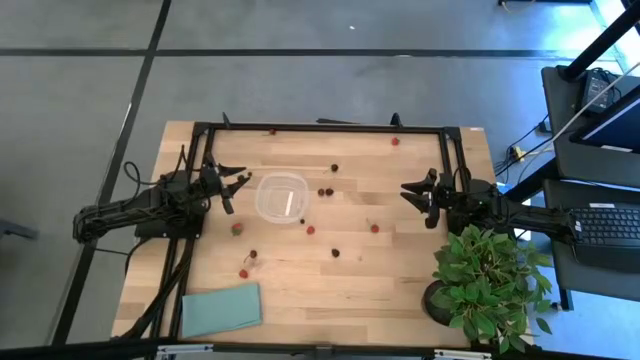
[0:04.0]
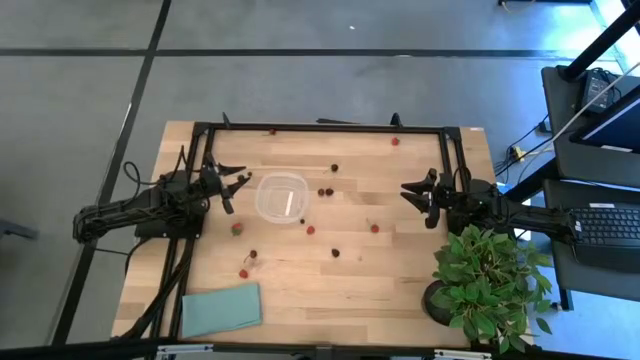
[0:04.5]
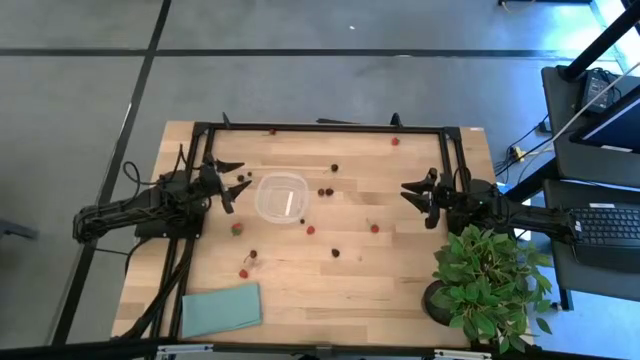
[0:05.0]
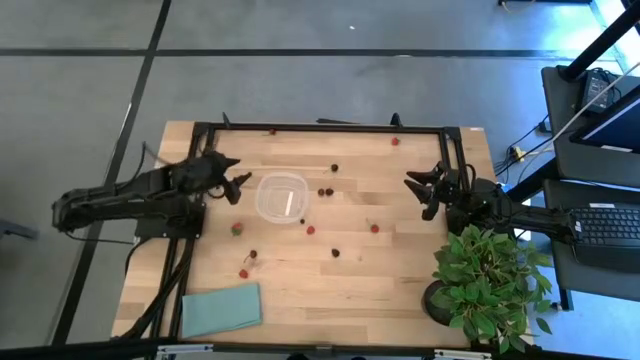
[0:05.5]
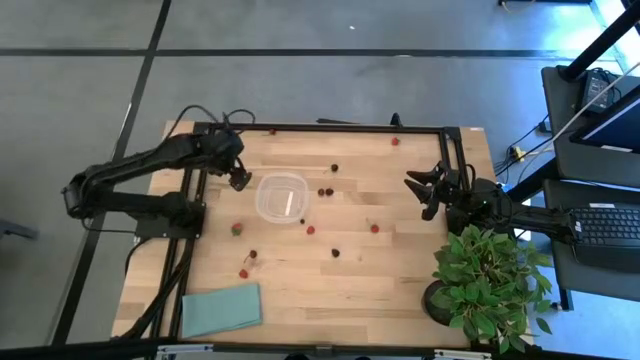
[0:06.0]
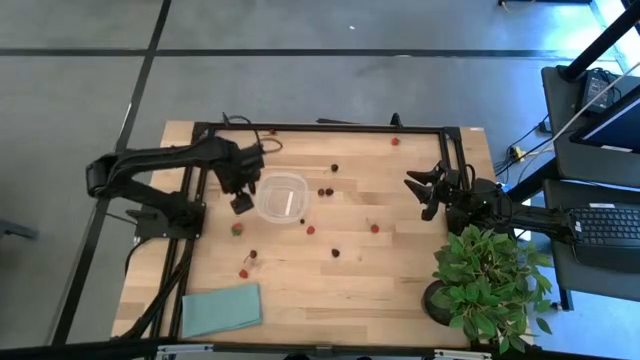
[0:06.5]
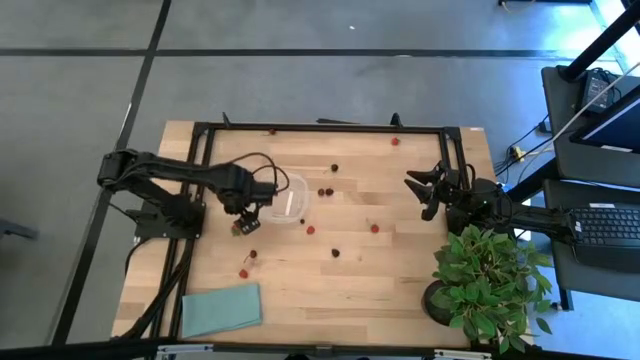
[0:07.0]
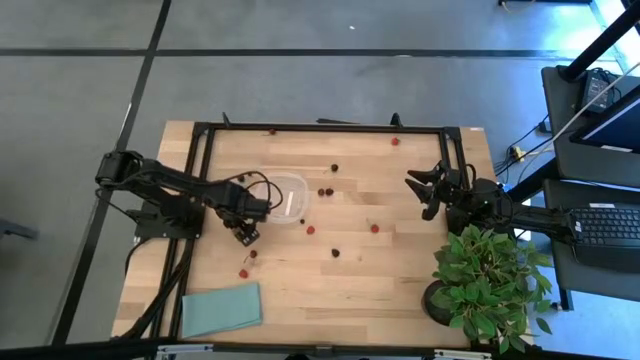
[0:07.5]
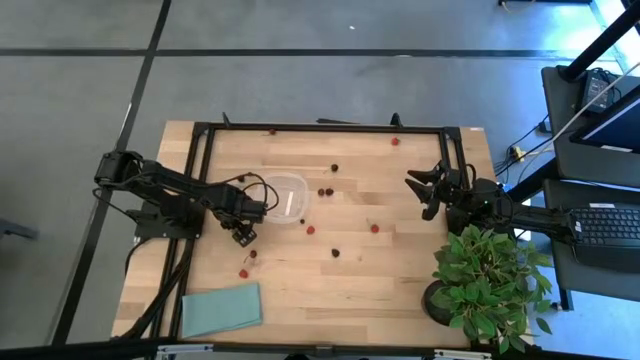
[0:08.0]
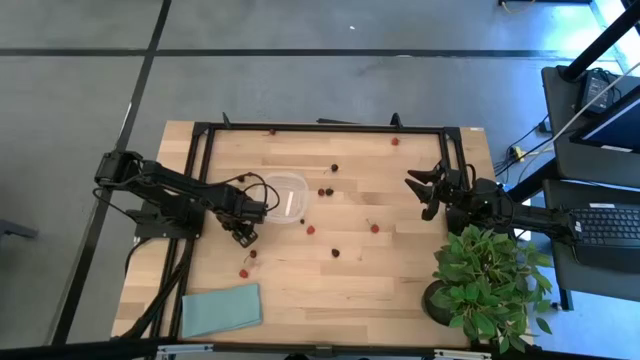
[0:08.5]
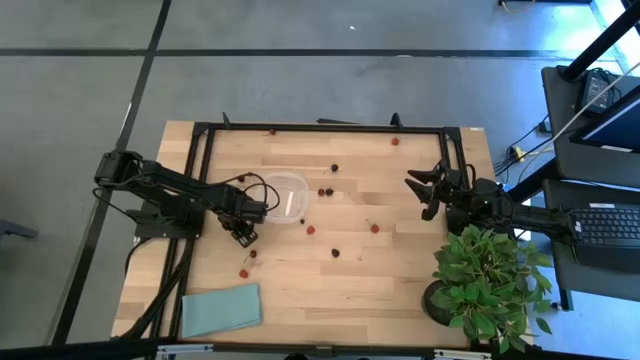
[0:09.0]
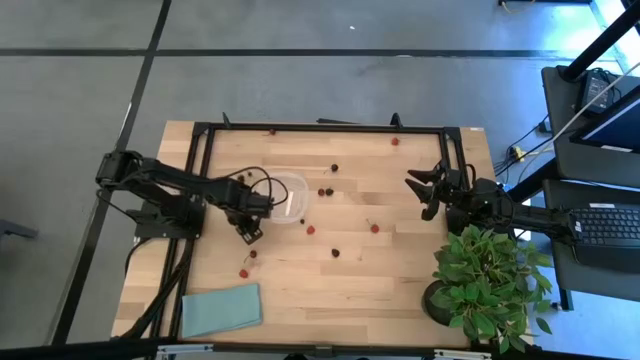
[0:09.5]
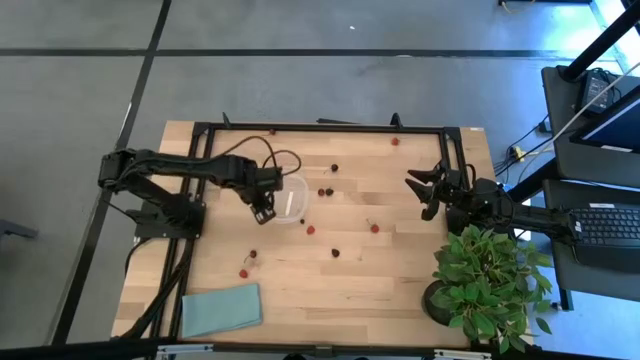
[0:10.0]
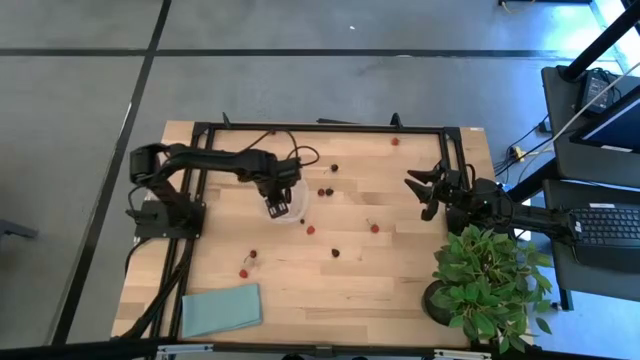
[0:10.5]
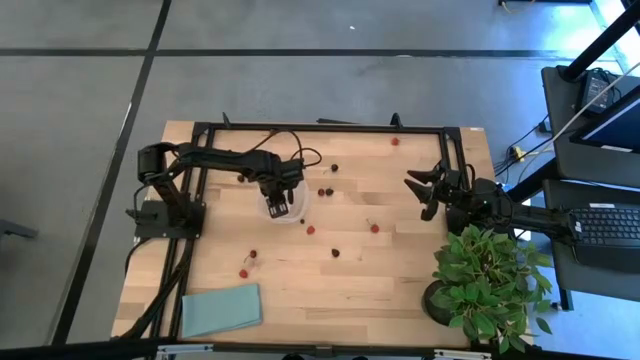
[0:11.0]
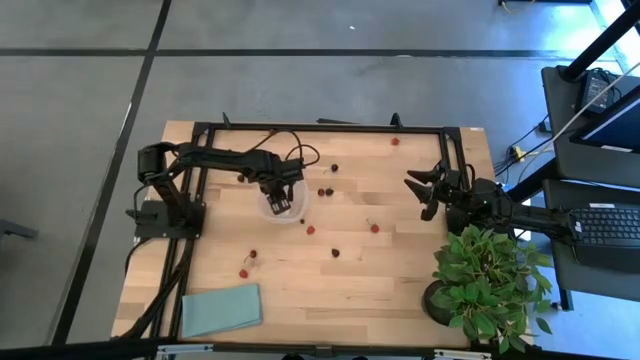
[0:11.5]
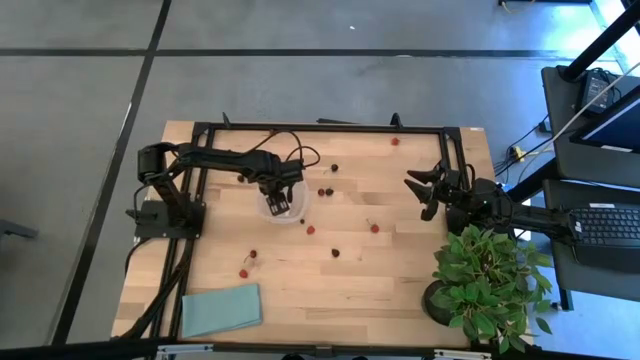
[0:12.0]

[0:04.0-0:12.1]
Task: Pick and placing Produce into tupperware
Put the bottom left strawberry into the transparent container

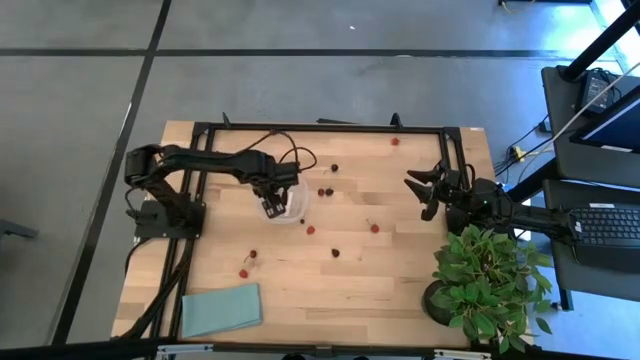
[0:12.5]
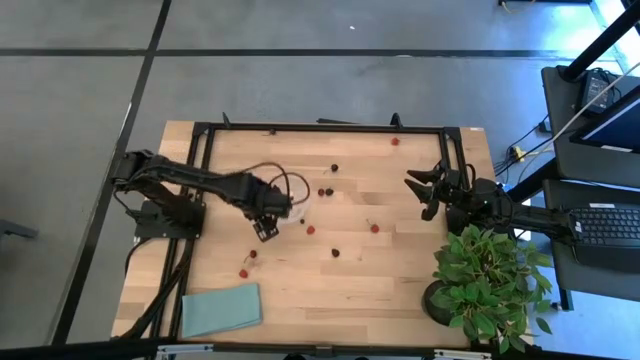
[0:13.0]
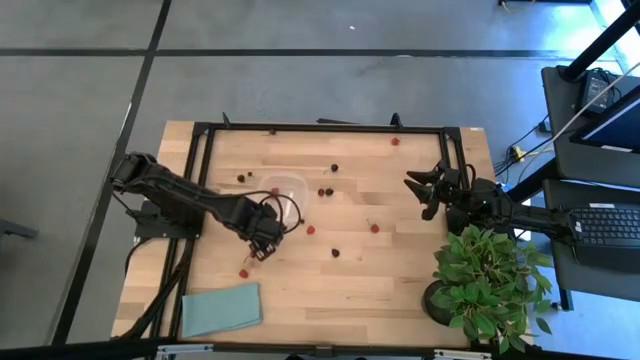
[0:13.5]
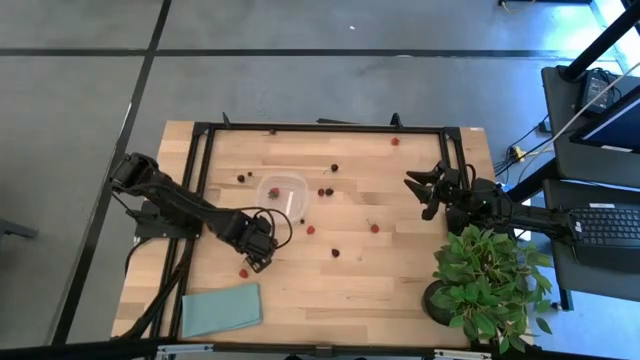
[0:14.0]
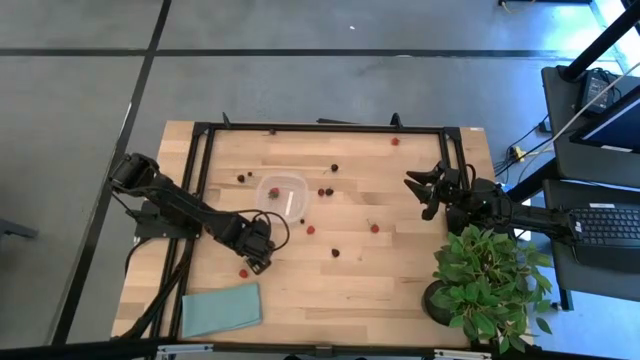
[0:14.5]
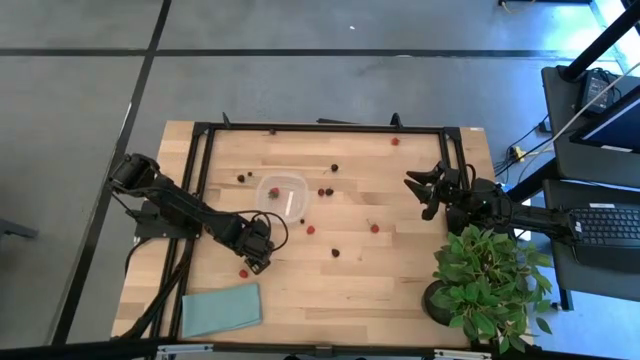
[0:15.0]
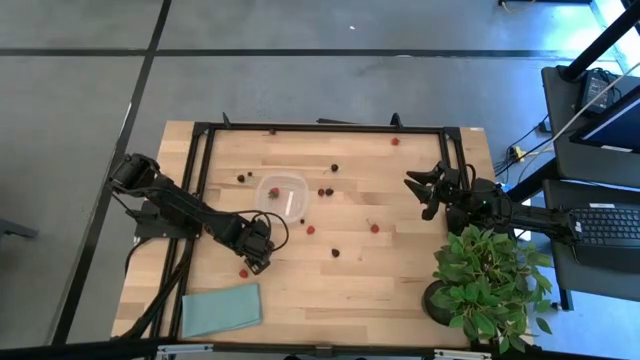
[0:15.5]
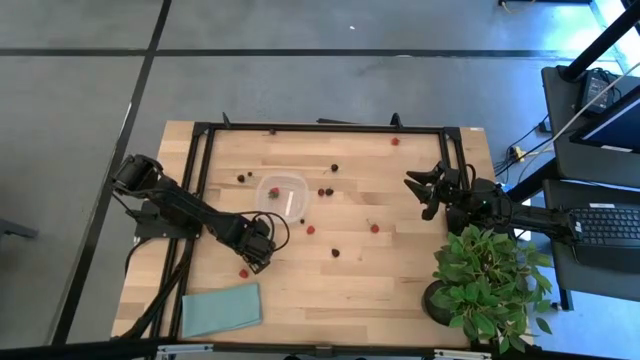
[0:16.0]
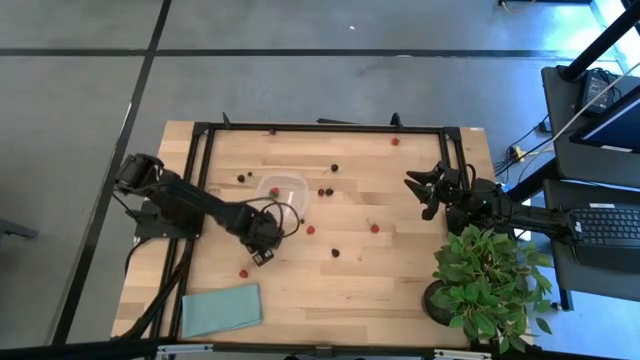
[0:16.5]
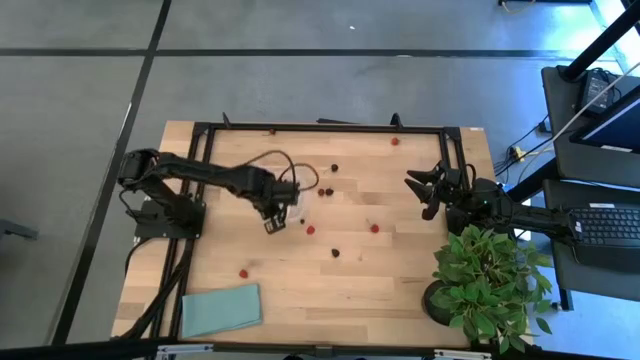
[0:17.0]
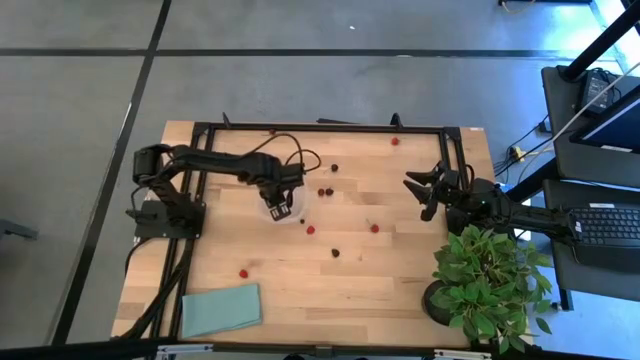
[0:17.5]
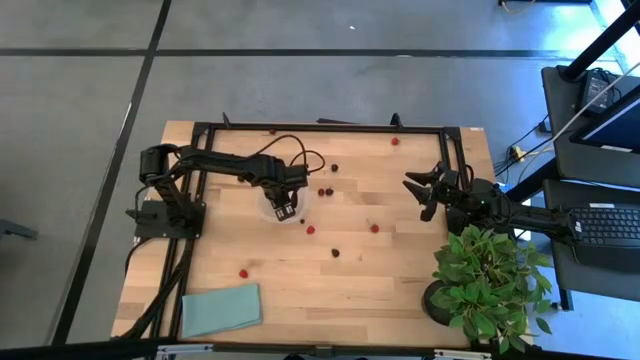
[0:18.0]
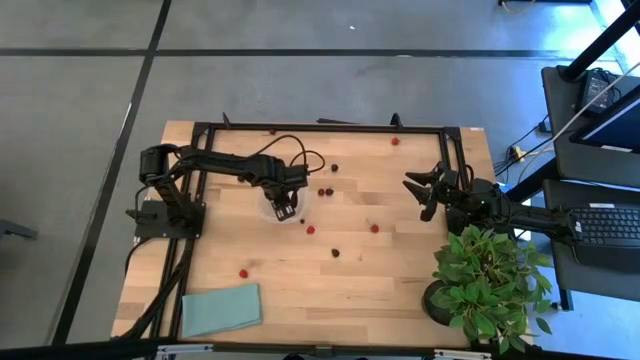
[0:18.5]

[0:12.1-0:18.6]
Put the bottom red cherry into the transparent container

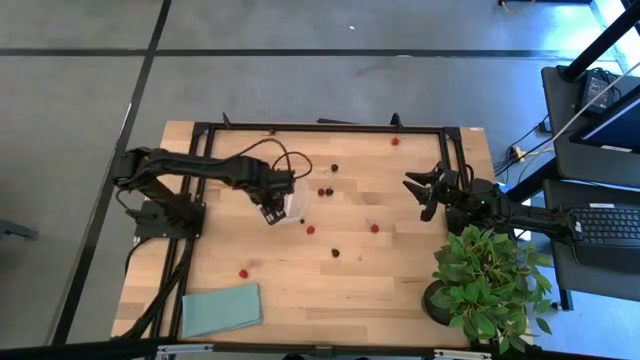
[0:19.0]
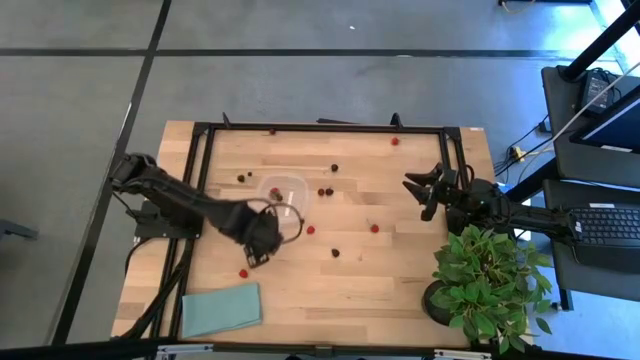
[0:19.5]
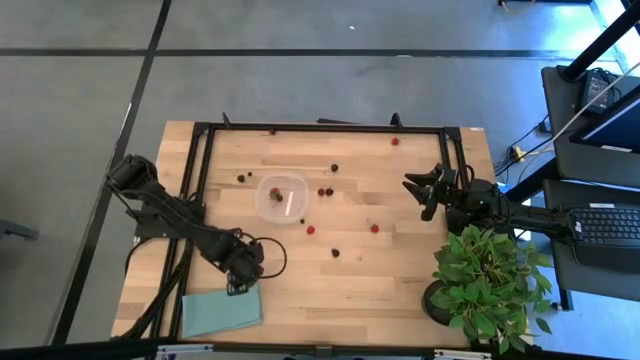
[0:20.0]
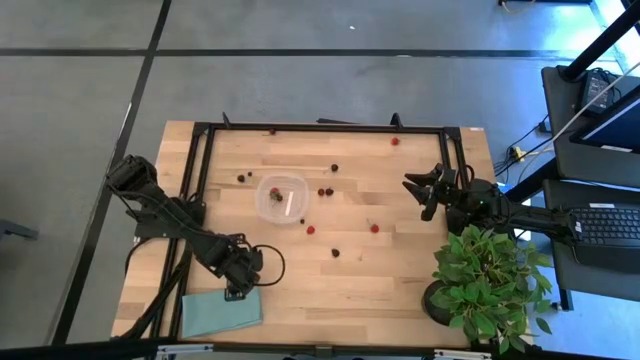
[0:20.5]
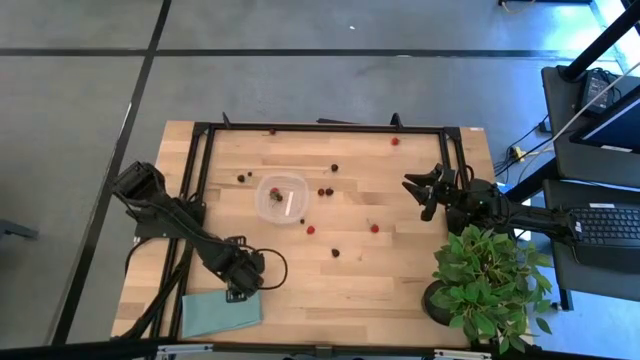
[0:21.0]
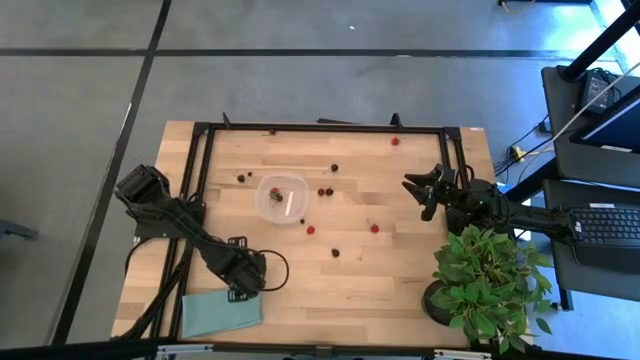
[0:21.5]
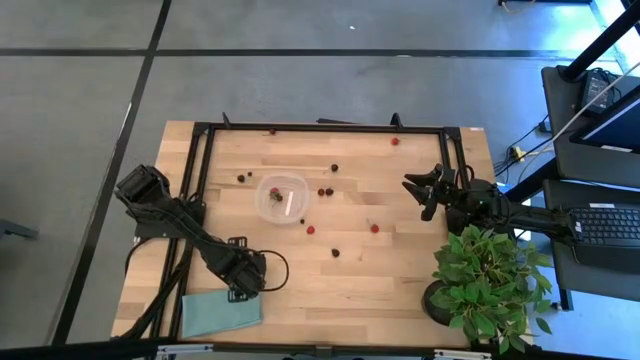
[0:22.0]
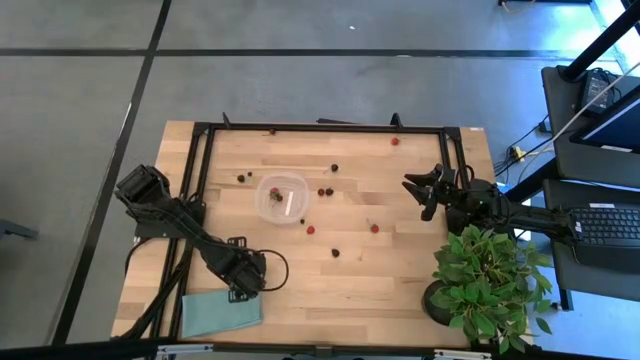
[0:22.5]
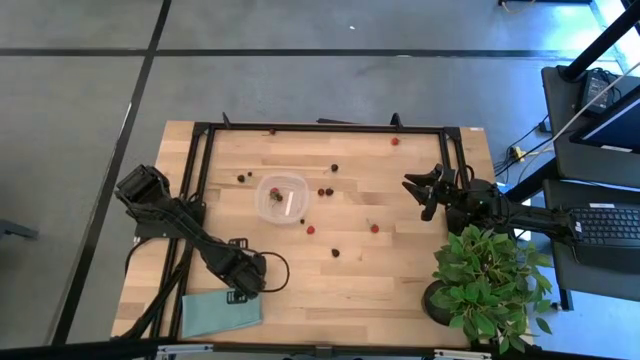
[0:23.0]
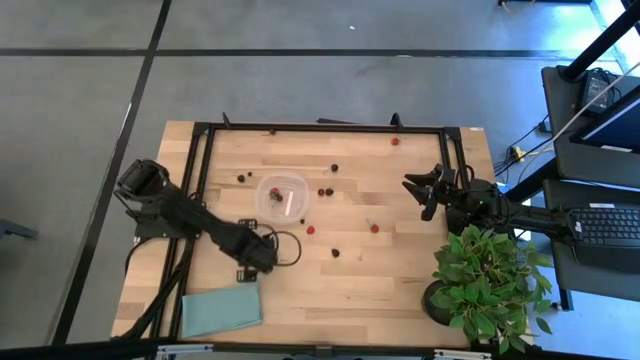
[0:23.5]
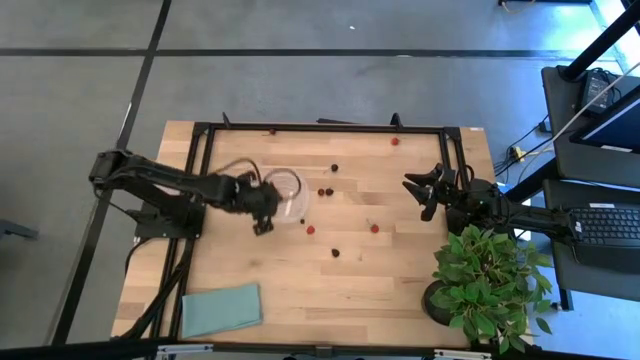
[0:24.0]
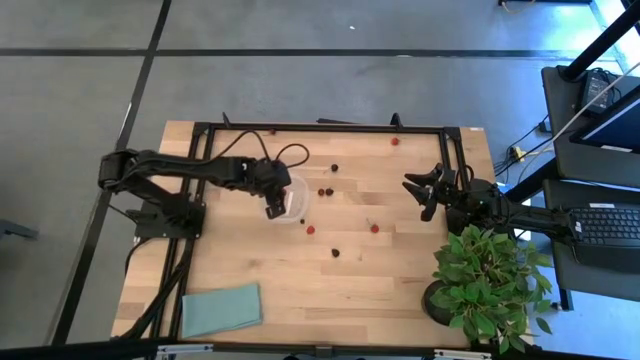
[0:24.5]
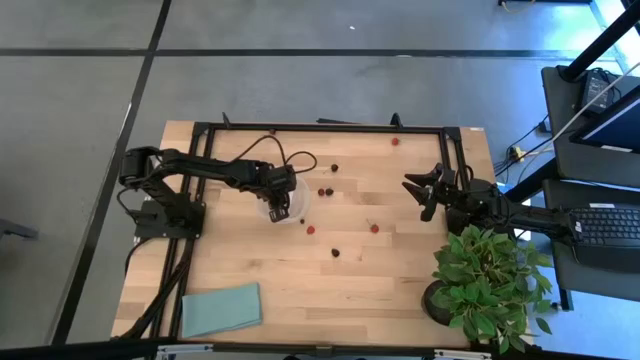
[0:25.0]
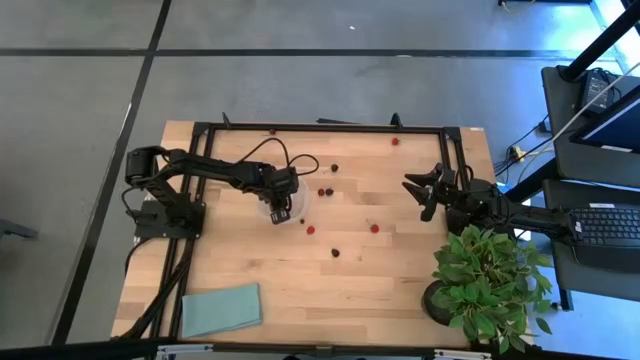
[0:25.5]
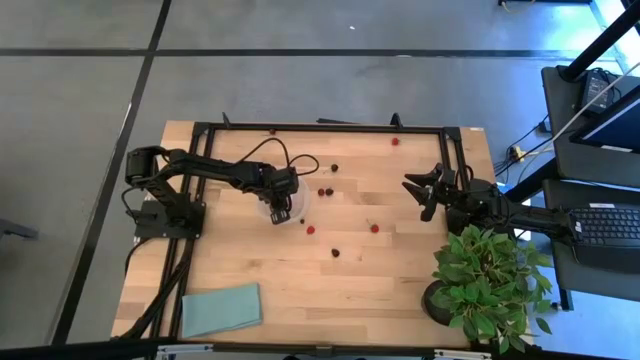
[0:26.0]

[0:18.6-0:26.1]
Put the bottom raspberry into the transparent container
